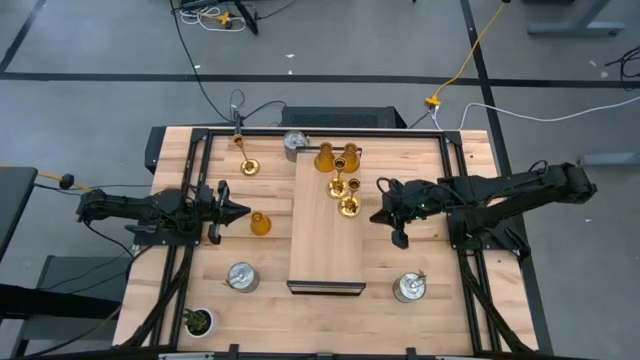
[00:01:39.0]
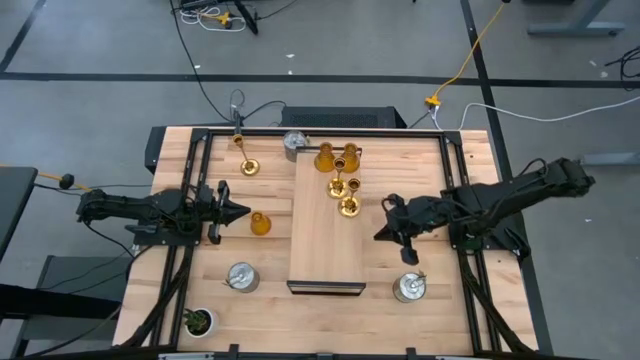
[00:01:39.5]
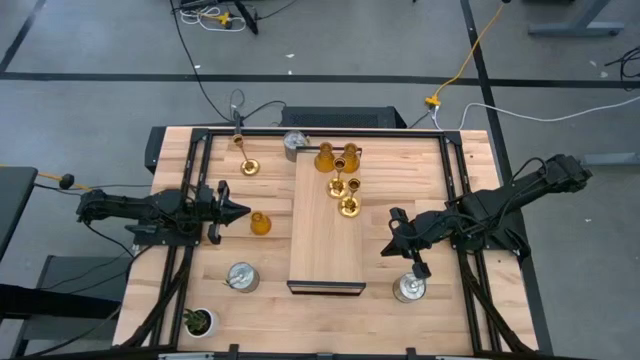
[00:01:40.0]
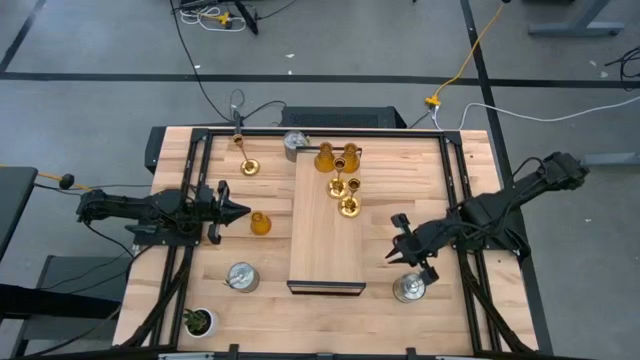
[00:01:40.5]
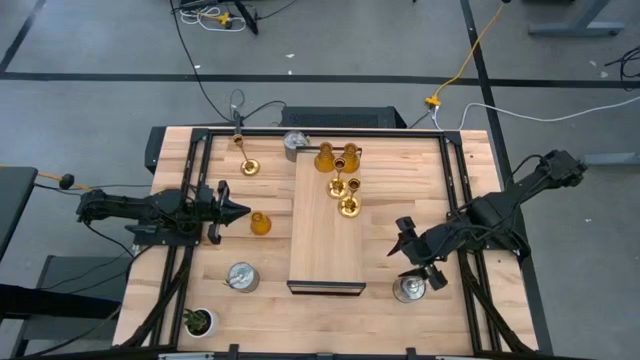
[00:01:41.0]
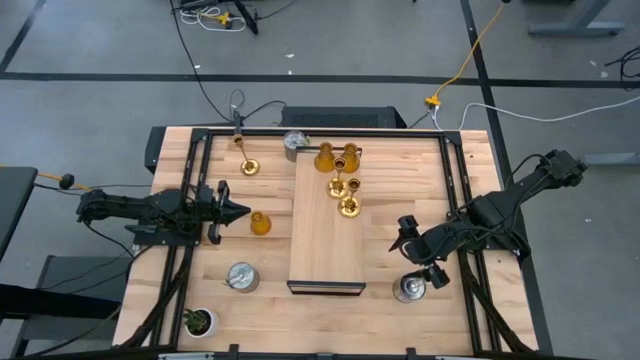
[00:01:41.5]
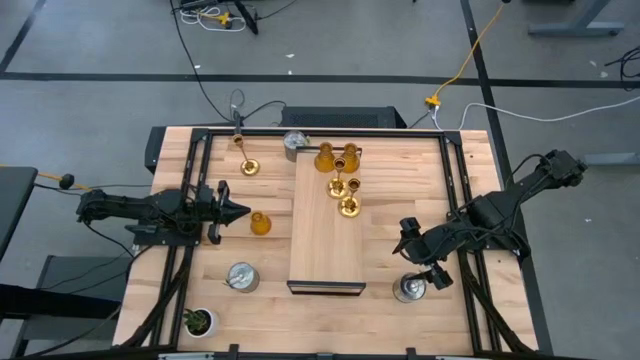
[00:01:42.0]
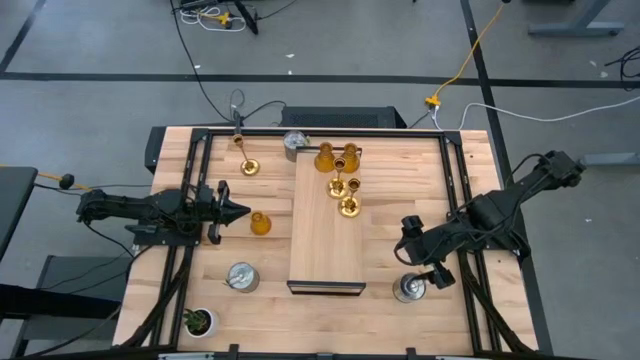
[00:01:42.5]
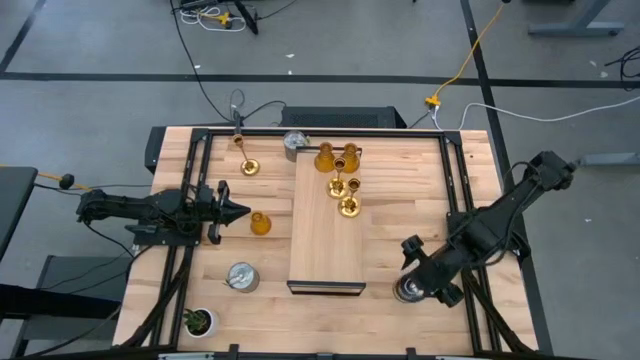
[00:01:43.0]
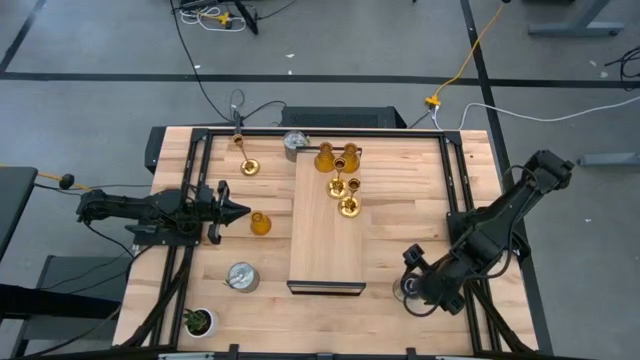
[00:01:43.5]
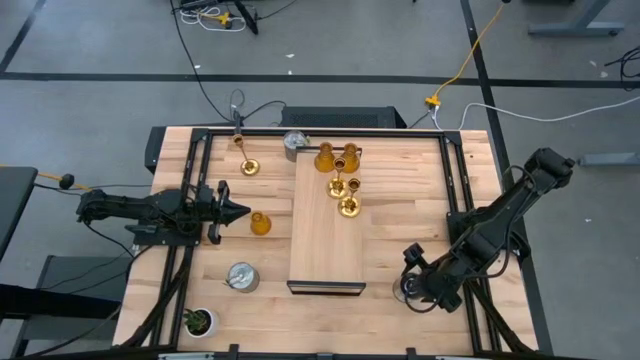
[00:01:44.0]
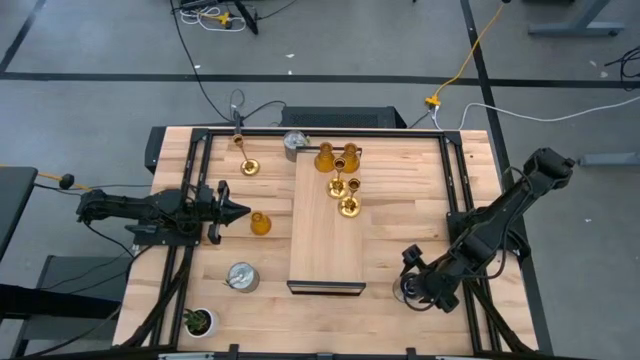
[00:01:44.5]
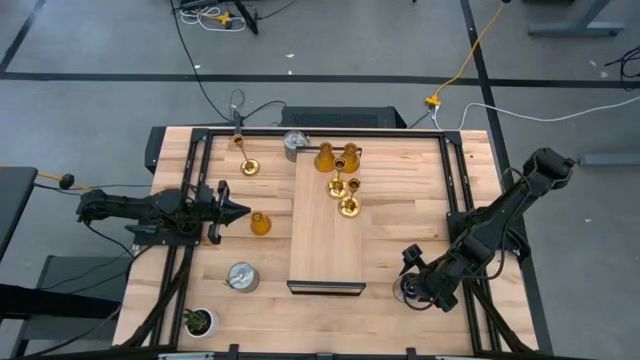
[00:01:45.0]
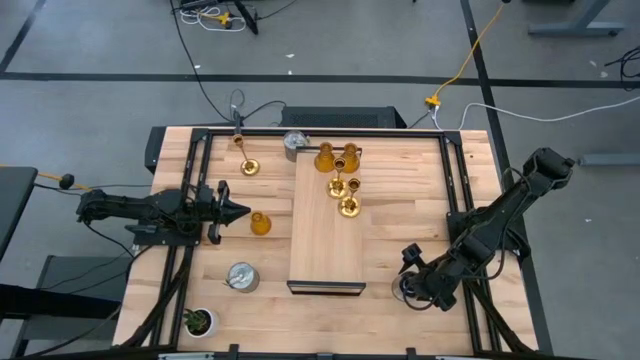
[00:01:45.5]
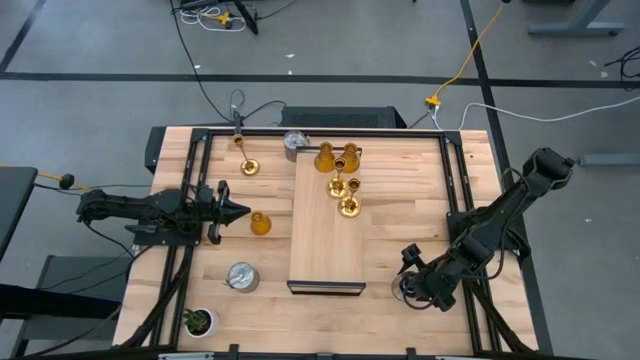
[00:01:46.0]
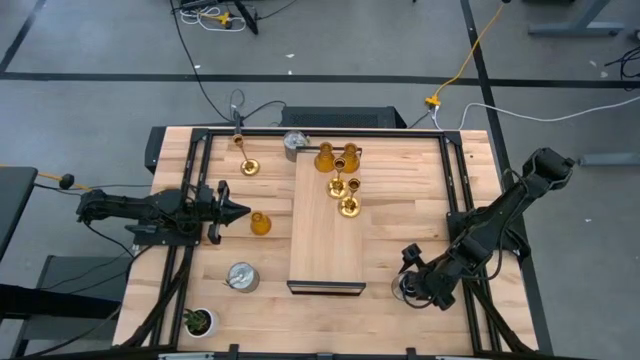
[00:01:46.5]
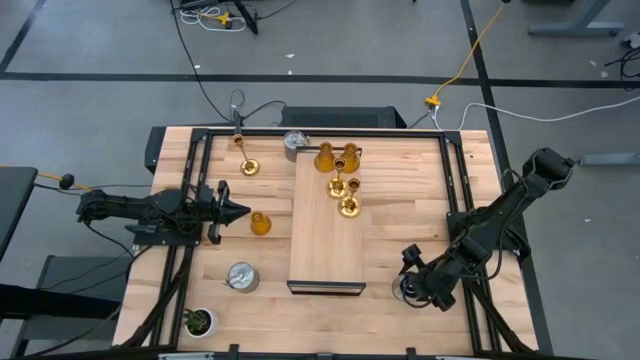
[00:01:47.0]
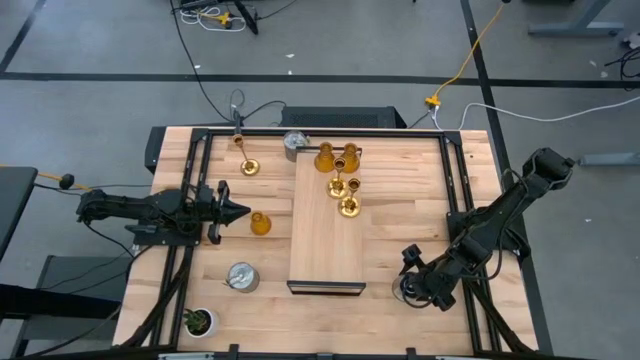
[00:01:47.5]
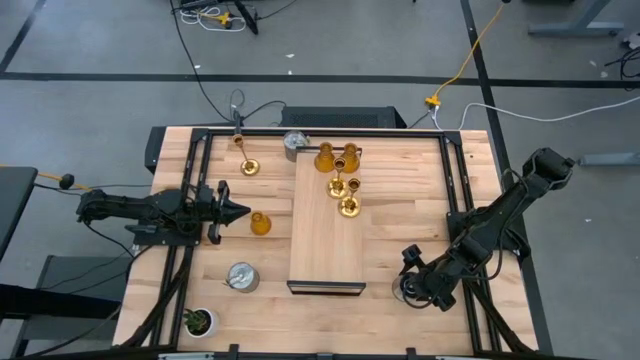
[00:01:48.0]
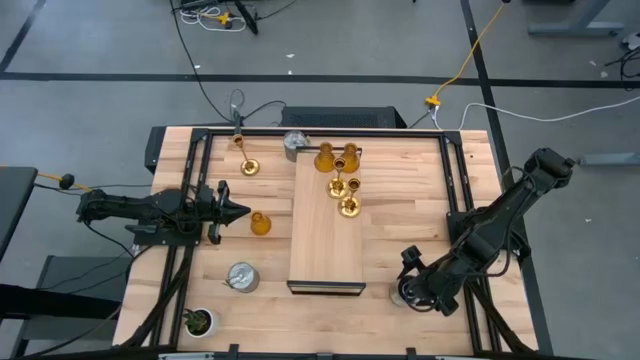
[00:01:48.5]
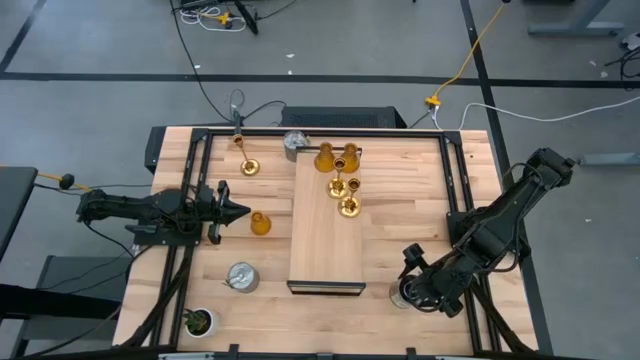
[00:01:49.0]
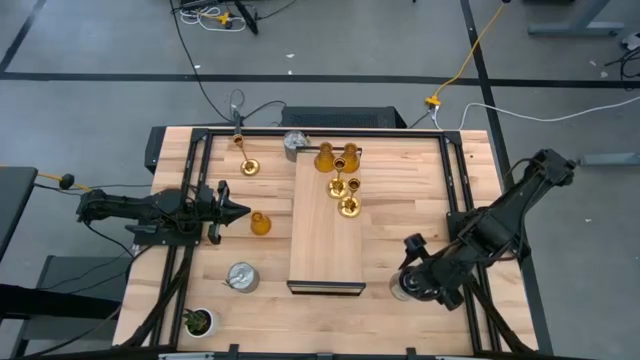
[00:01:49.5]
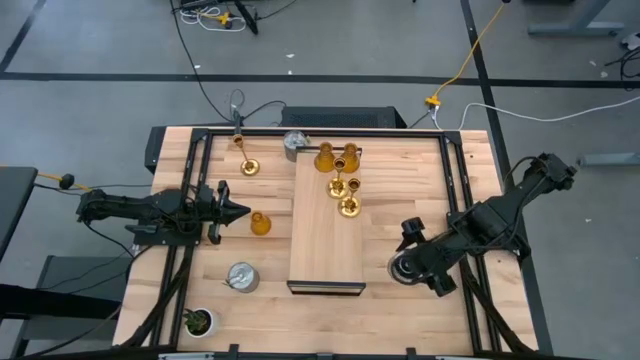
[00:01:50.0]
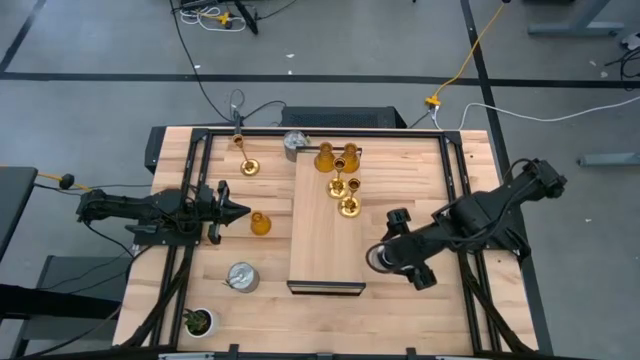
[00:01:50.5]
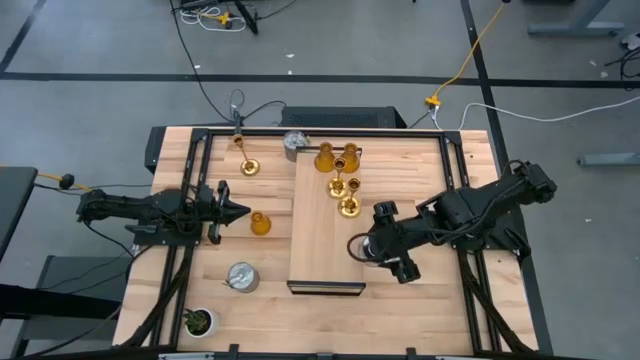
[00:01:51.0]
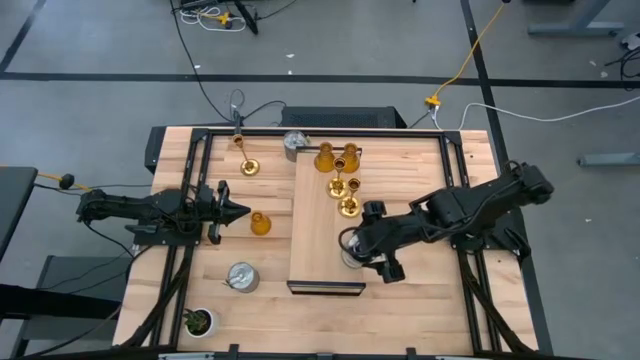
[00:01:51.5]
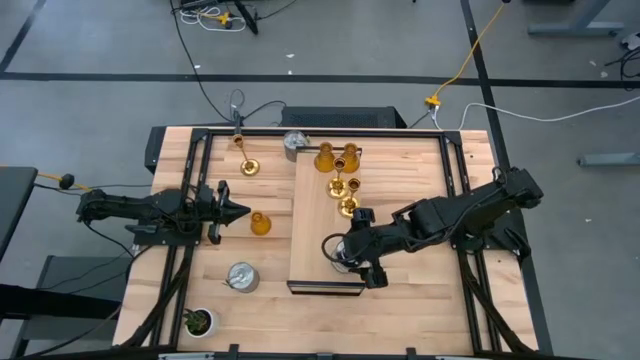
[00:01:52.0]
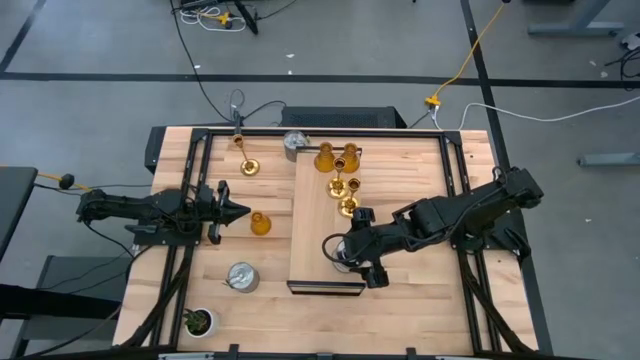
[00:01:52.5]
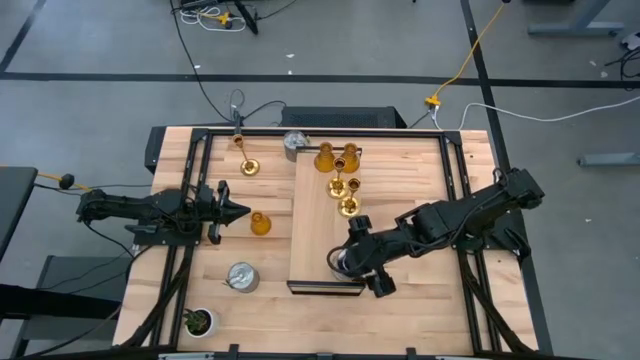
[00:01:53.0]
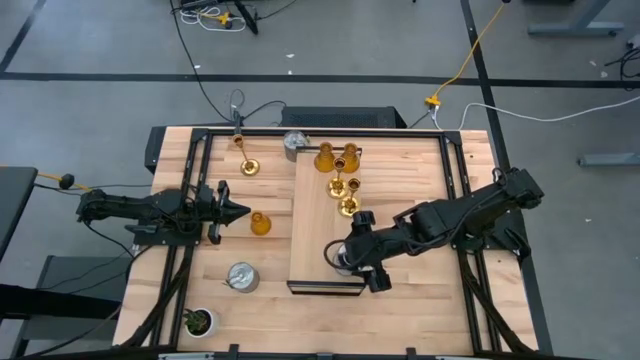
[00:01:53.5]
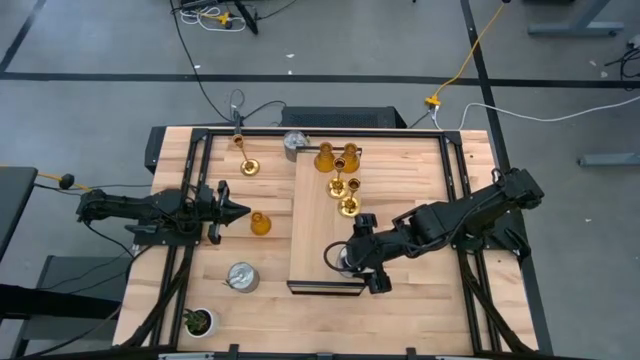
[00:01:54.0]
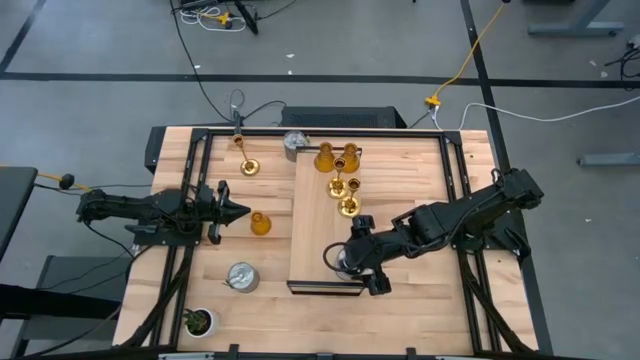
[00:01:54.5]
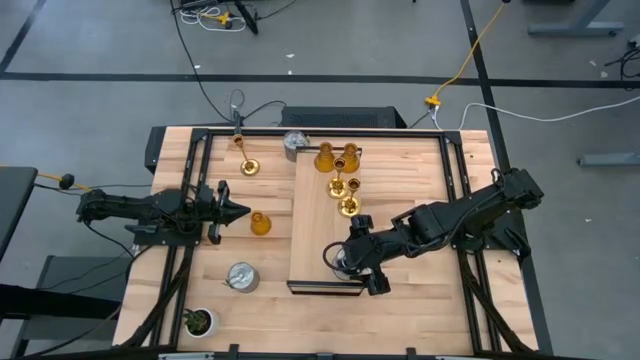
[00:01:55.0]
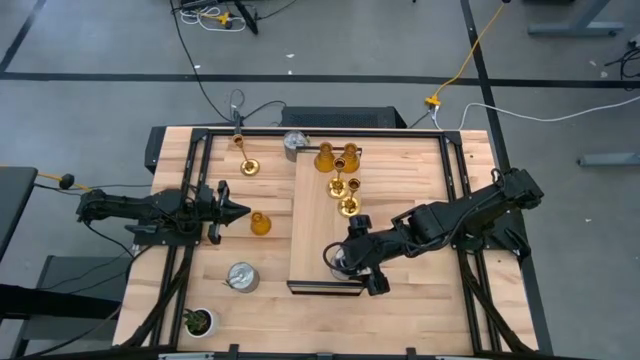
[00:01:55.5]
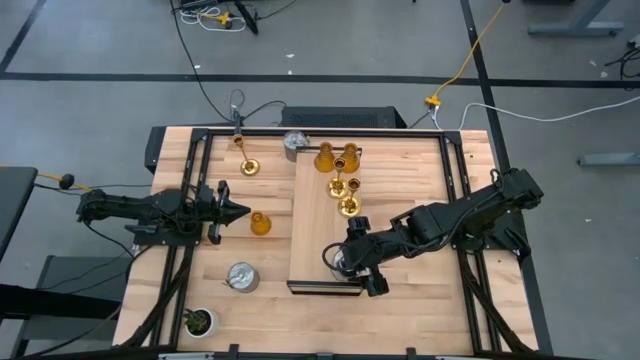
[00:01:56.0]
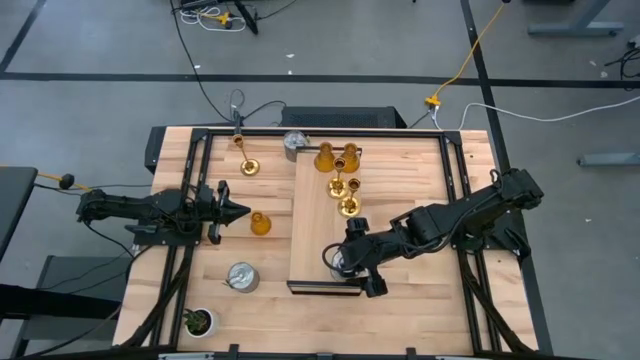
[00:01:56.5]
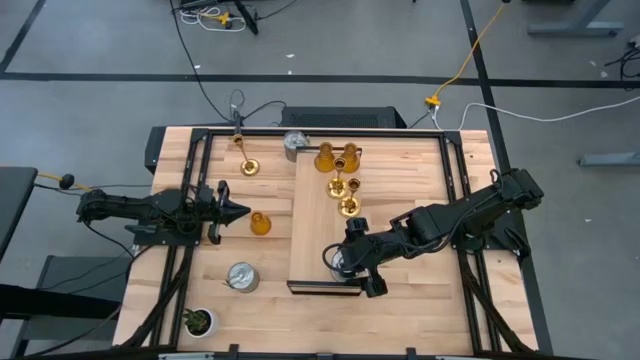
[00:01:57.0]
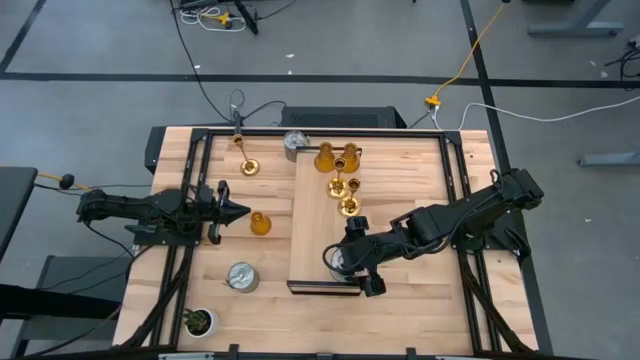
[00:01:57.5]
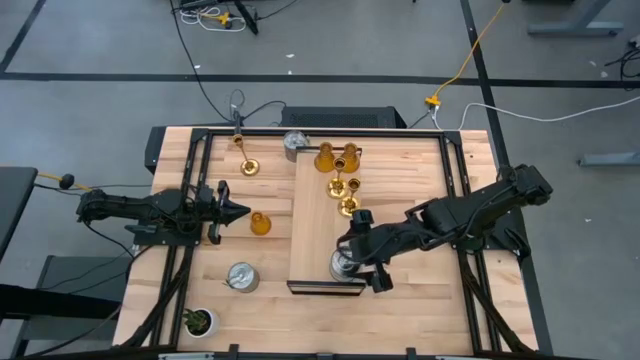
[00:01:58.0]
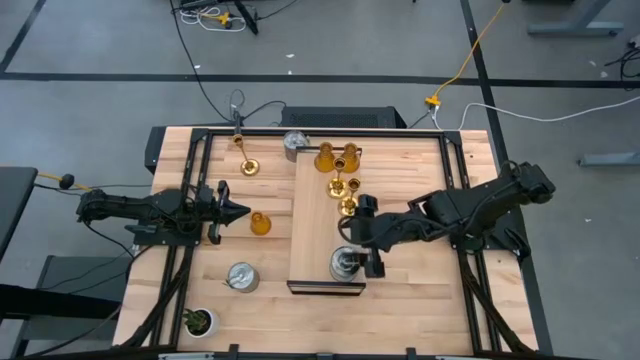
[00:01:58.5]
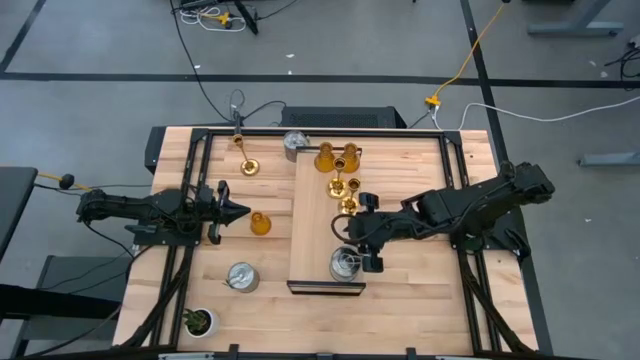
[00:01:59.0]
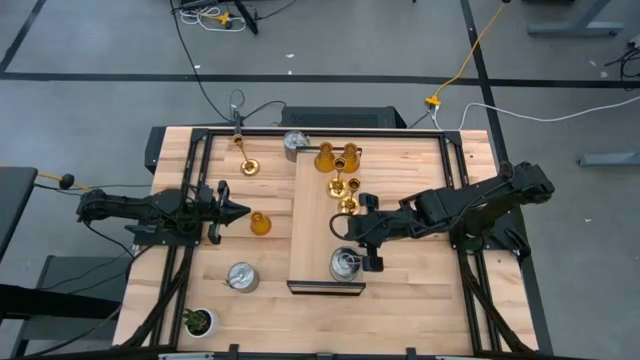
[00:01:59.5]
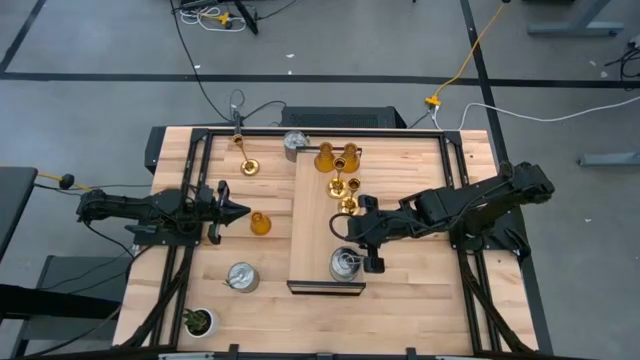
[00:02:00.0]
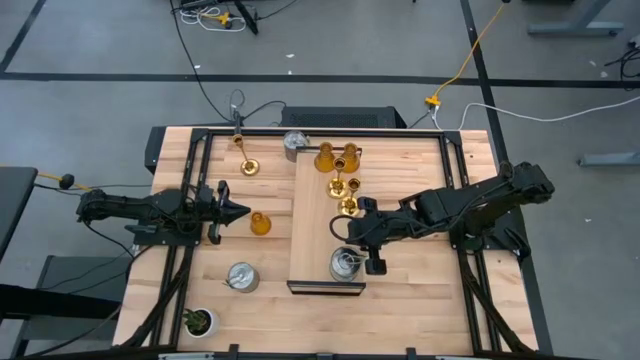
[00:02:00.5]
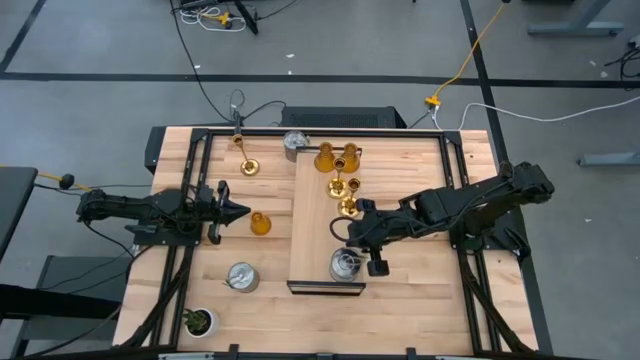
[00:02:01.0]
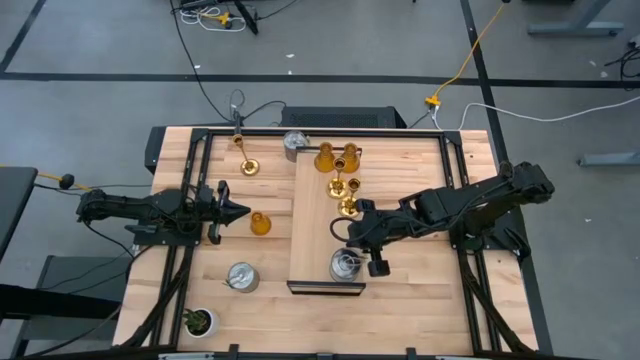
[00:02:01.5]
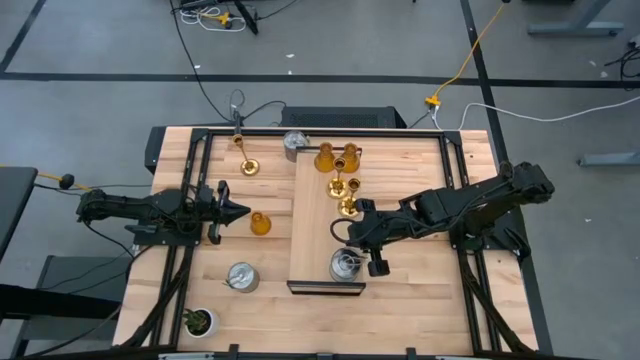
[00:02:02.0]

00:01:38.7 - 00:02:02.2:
Task: Pick & Place candle stick holders
Put the bottom right scented candle on the shelf
